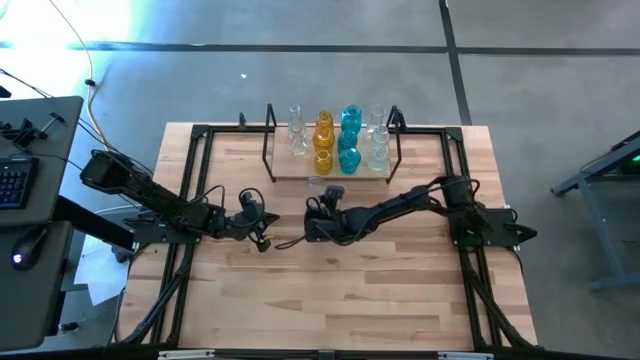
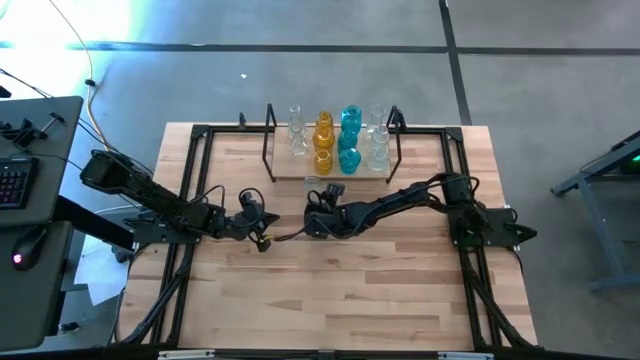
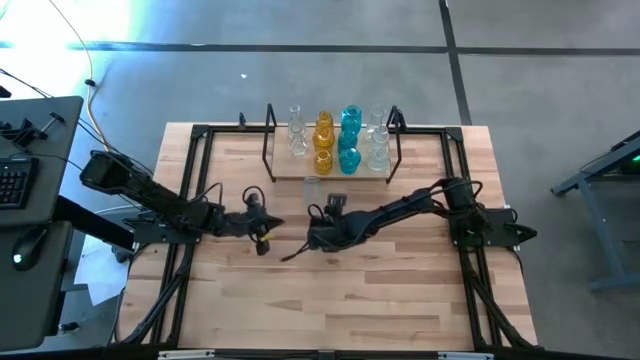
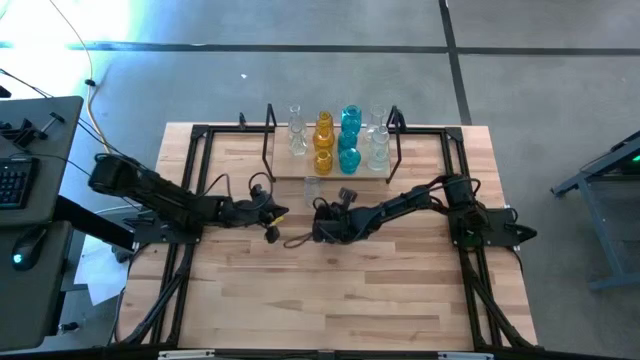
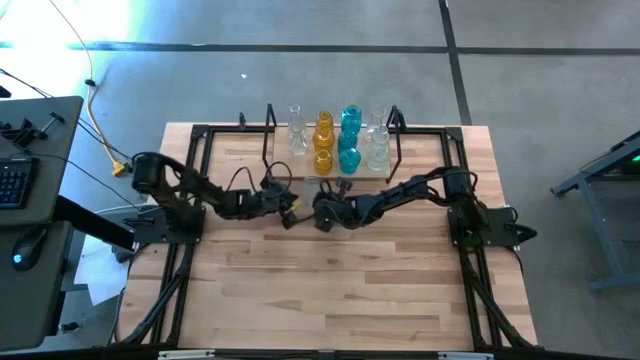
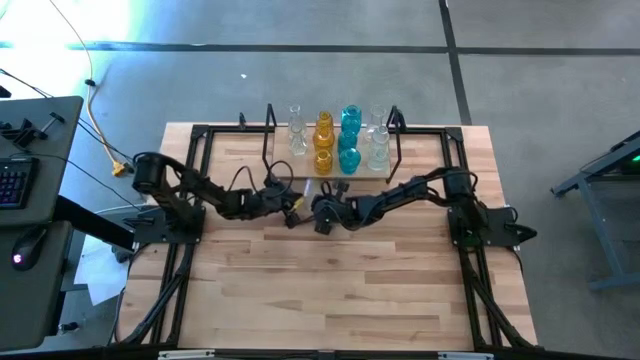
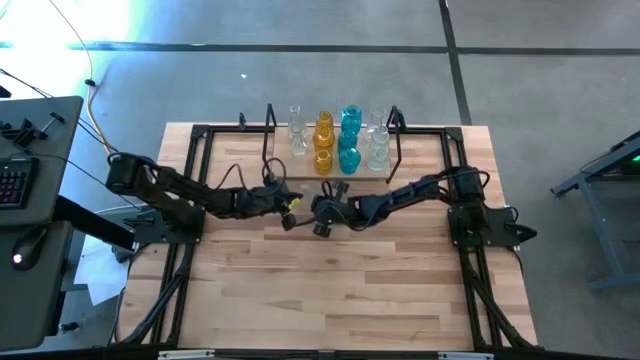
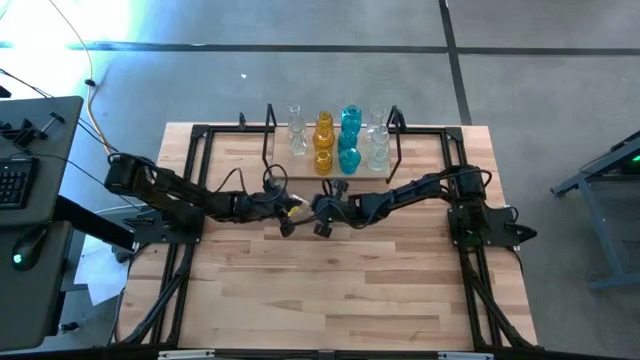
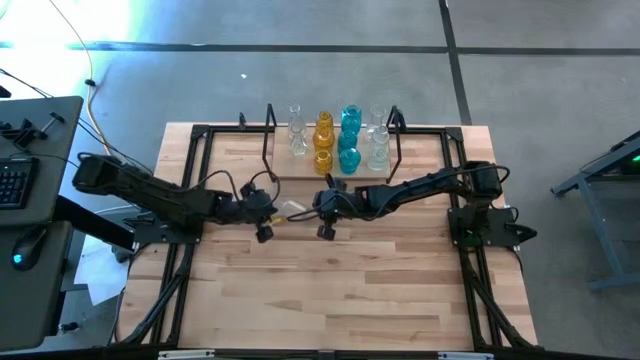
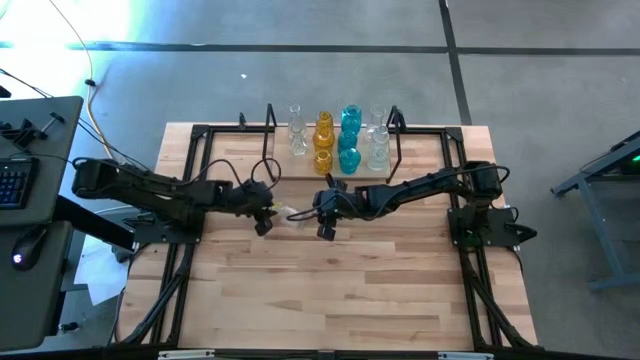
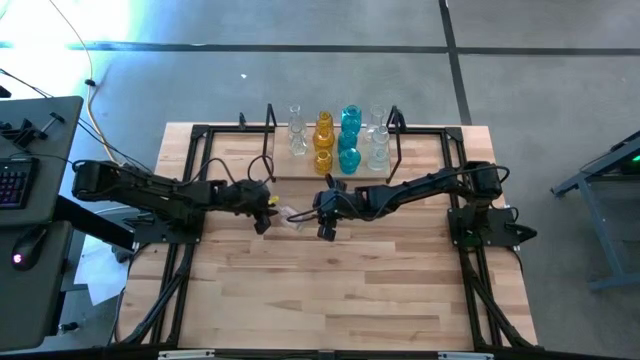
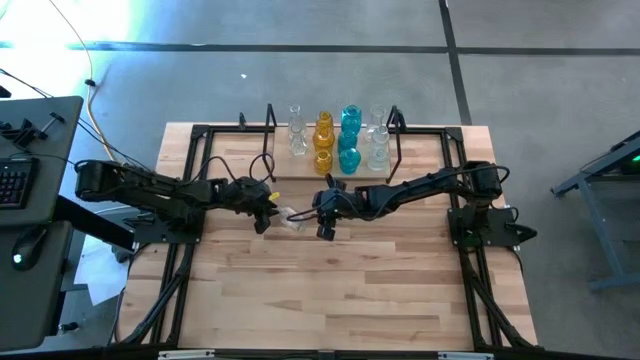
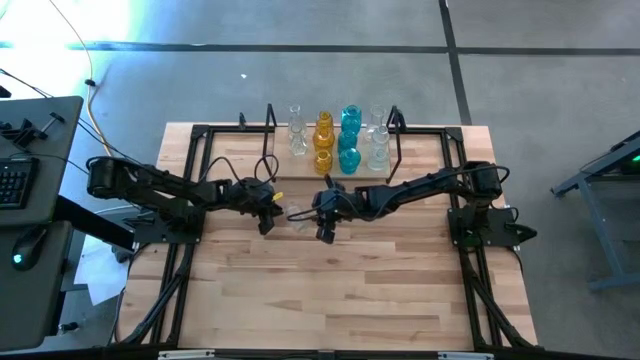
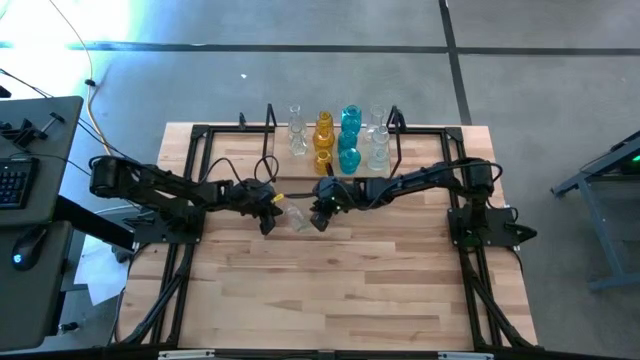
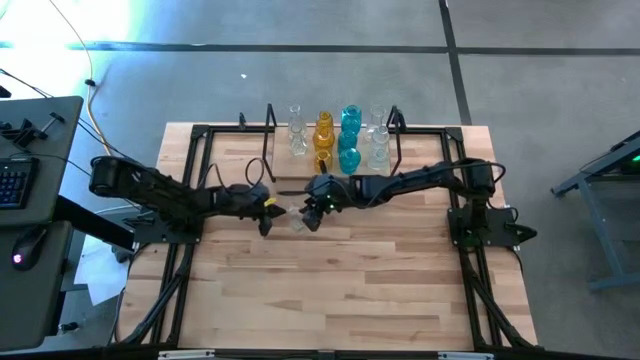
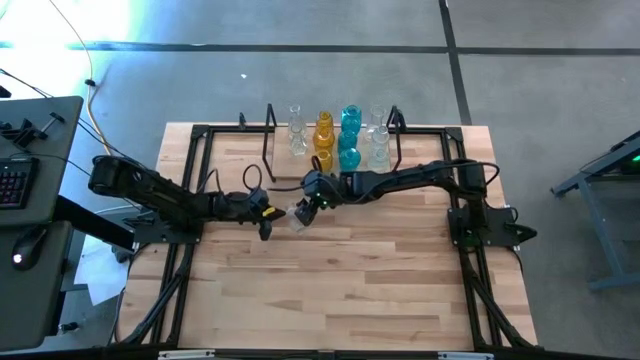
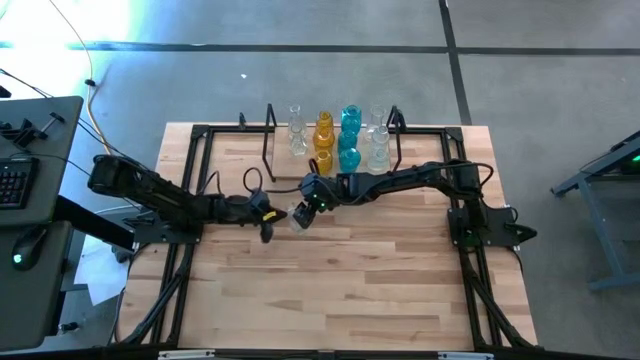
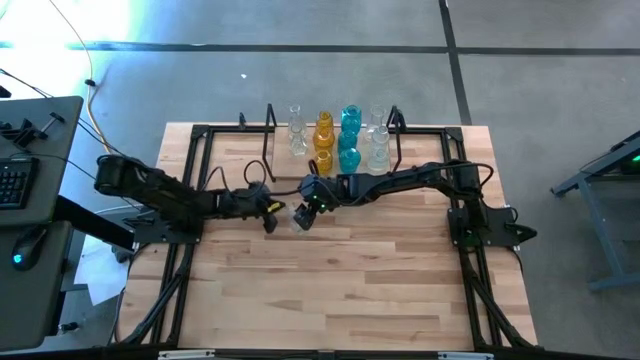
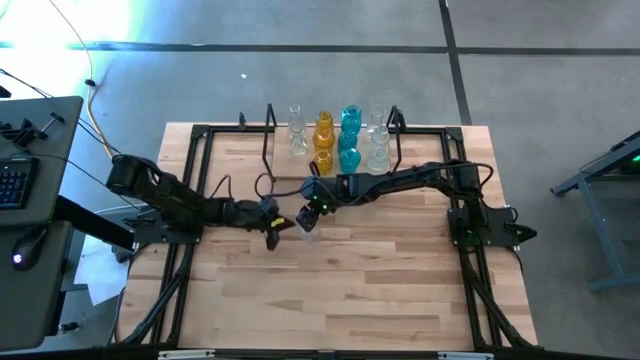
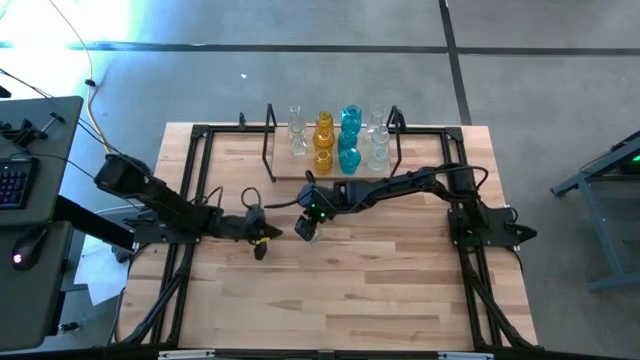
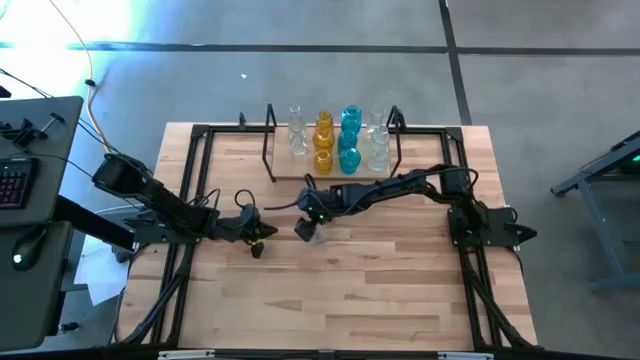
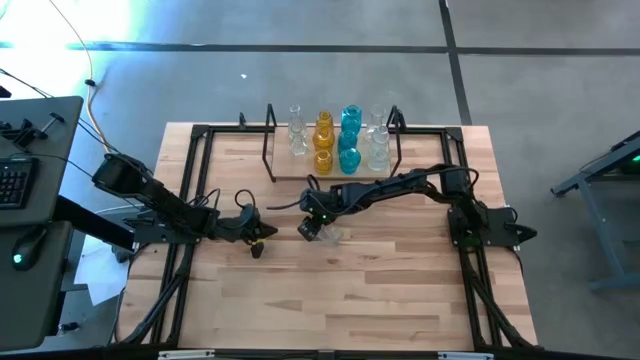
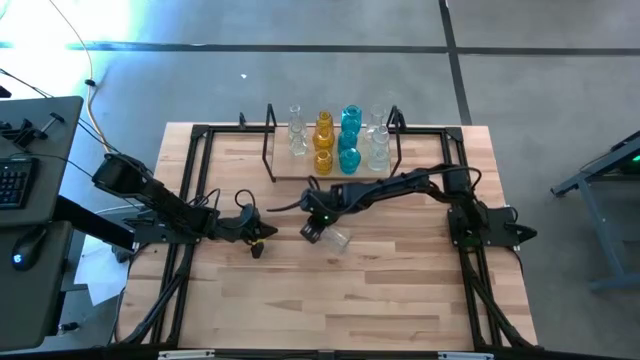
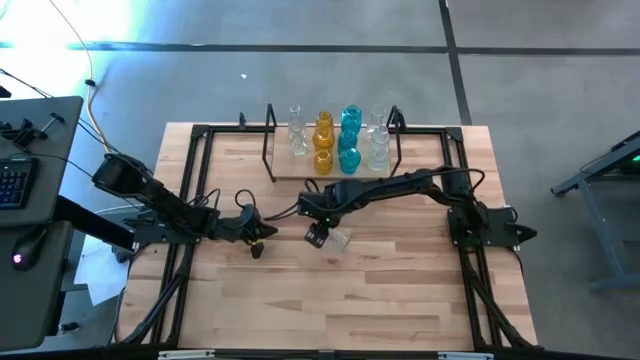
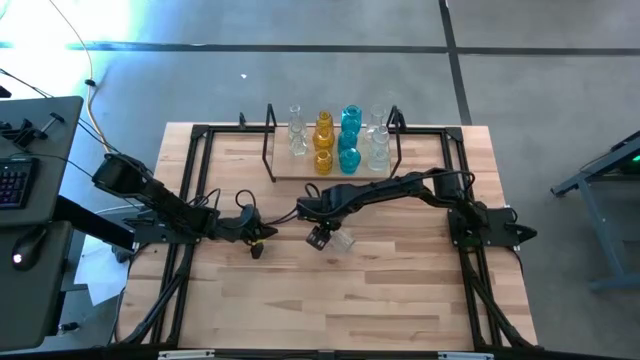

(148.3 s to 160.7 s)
Task: sort vases onto shelf
Put the transparent vase on the shelf aligned with other transparent vase

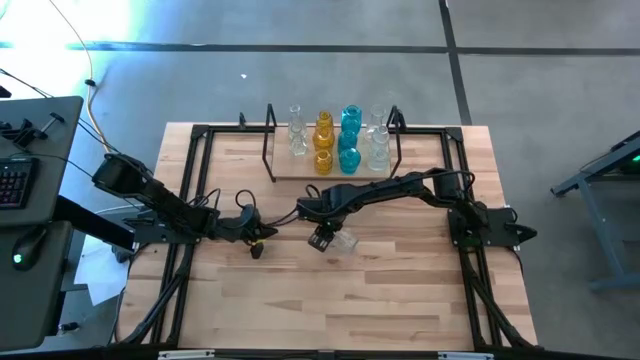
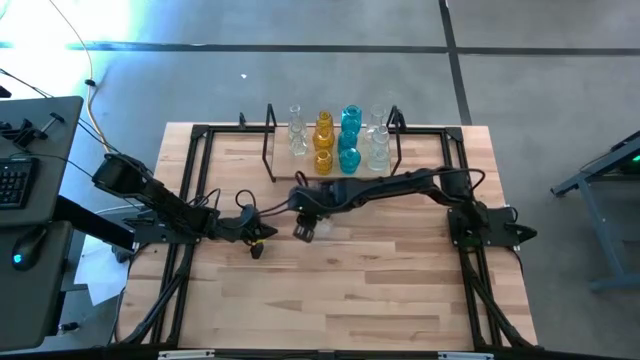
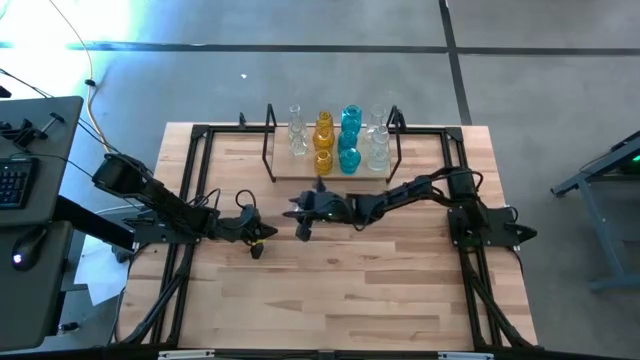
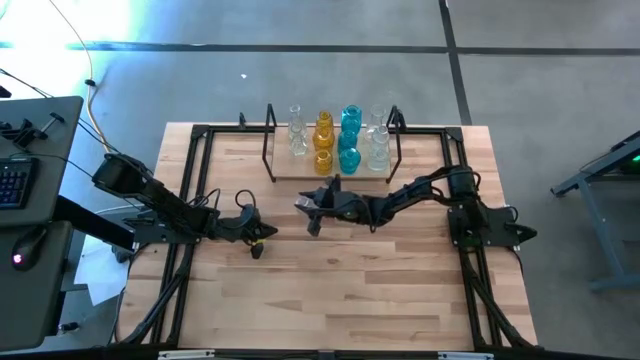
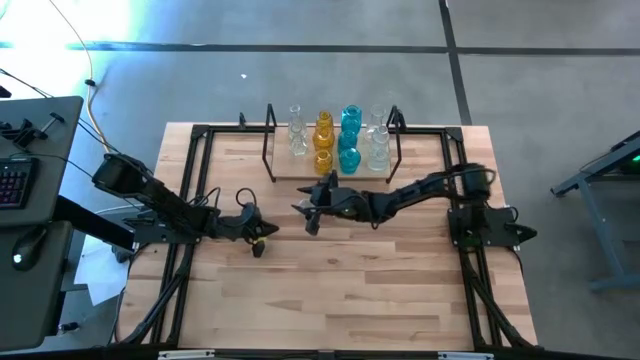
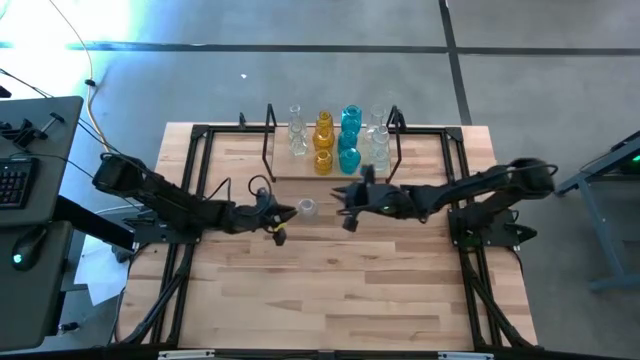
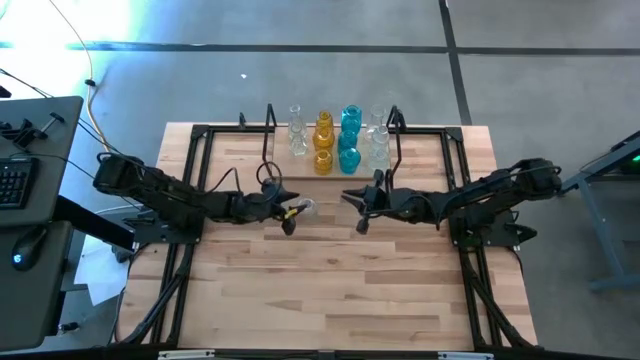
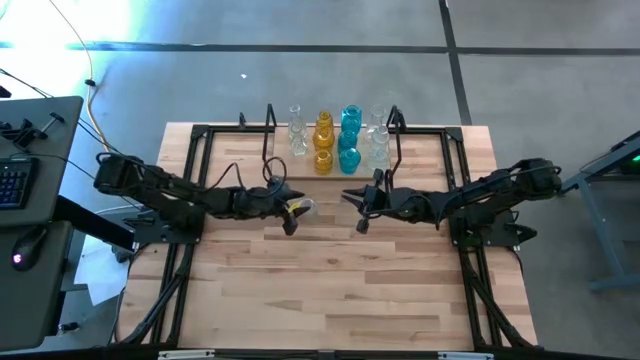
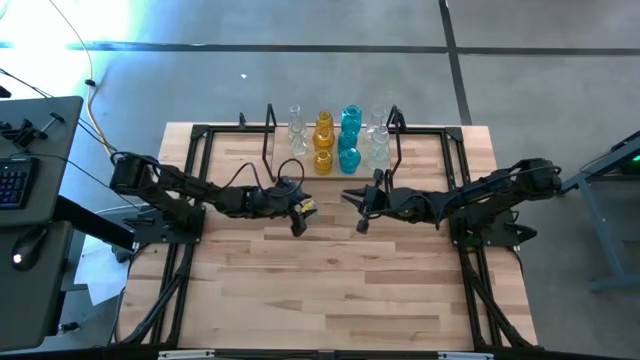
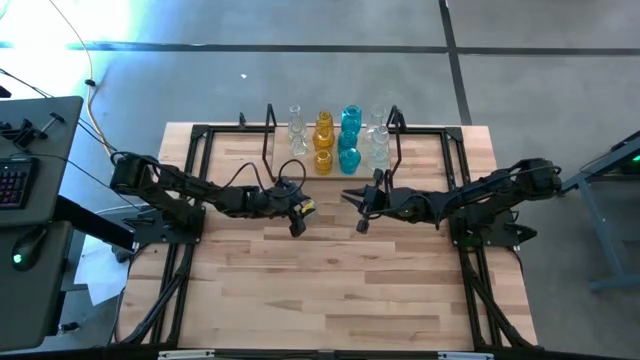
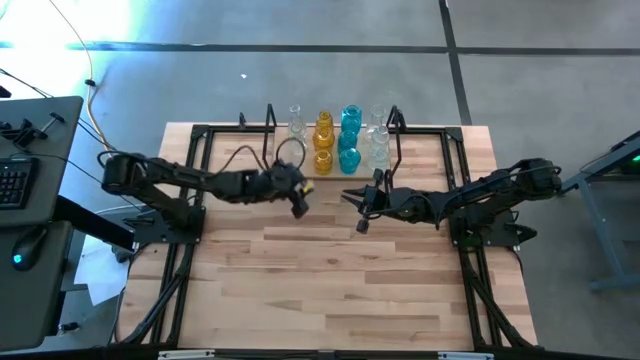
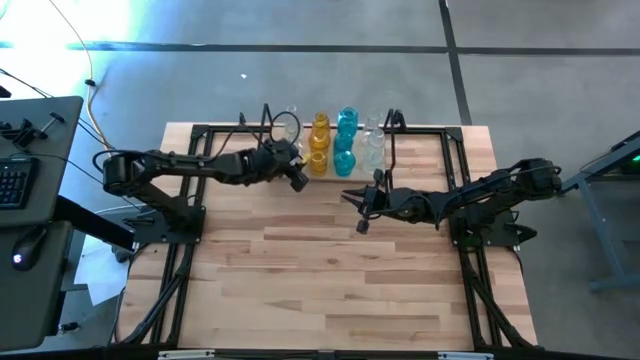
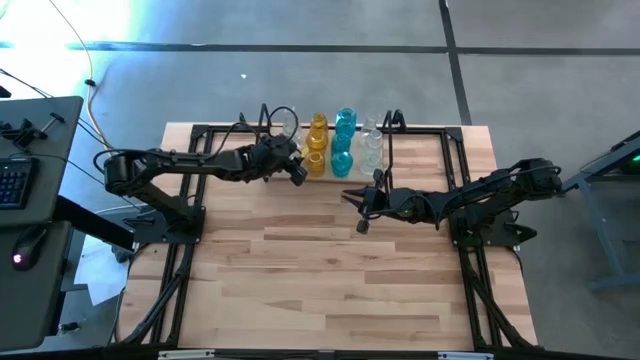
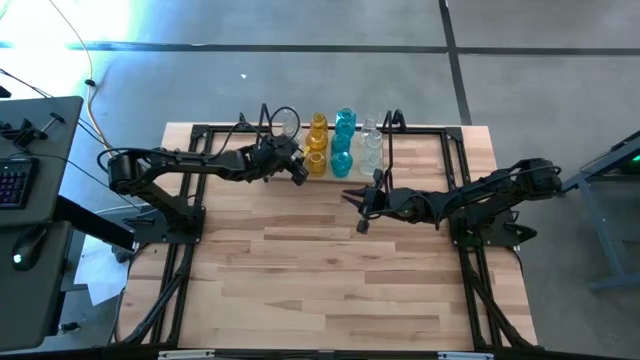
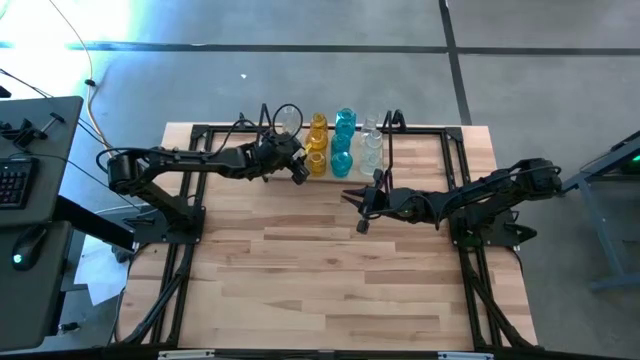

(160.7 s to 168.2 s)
Put the transparent vase on the shelf aligned with other transparent vase

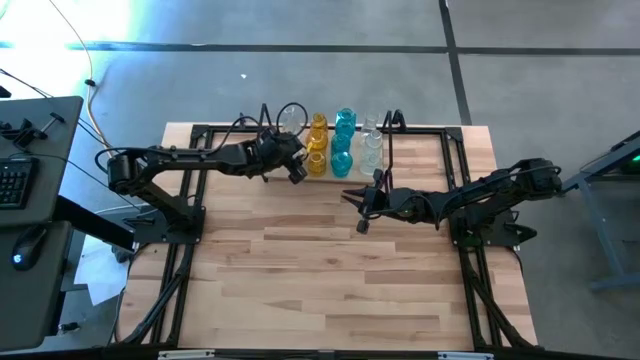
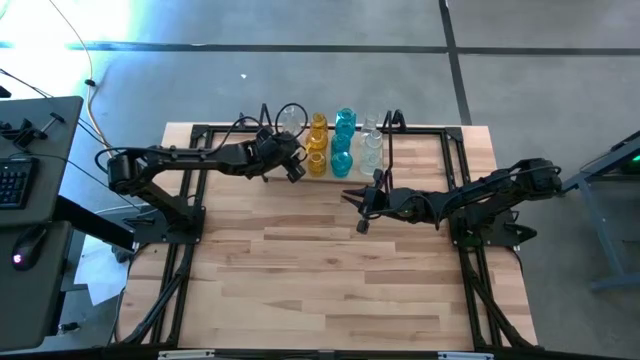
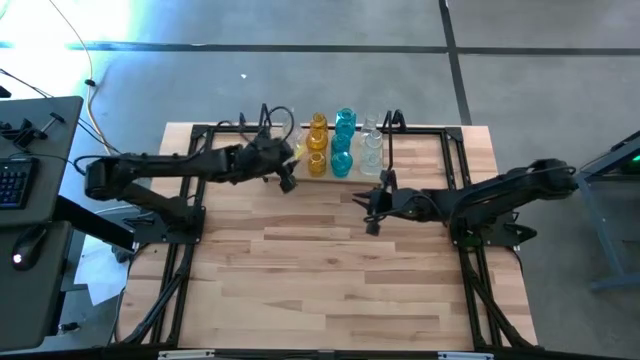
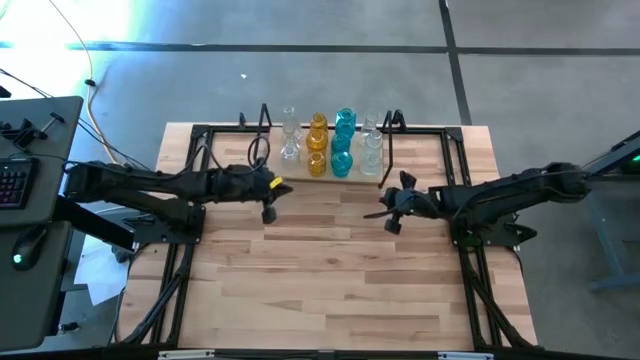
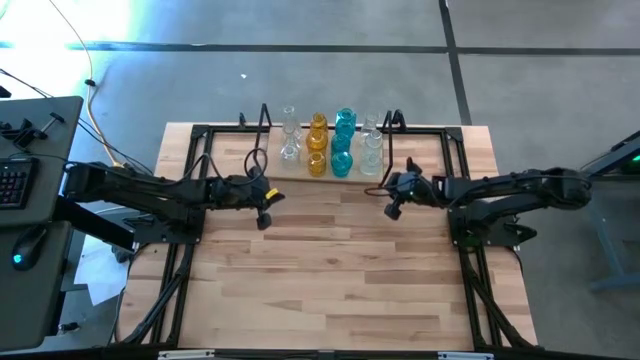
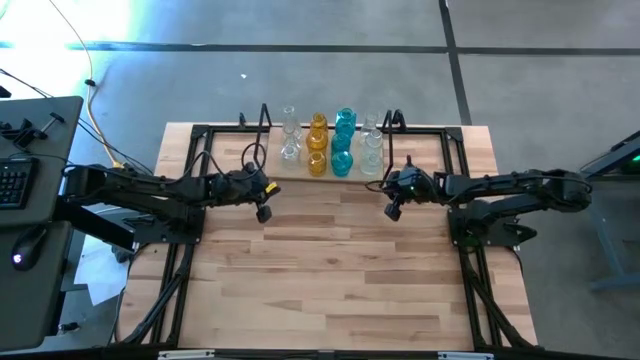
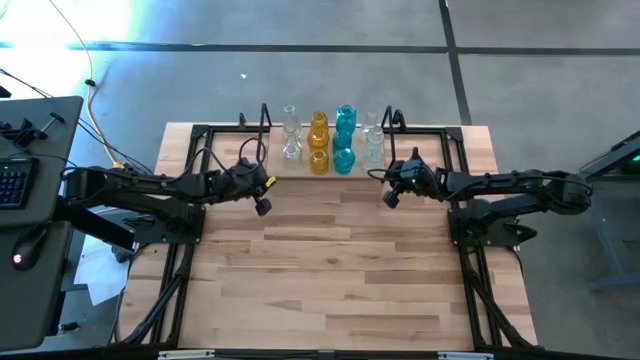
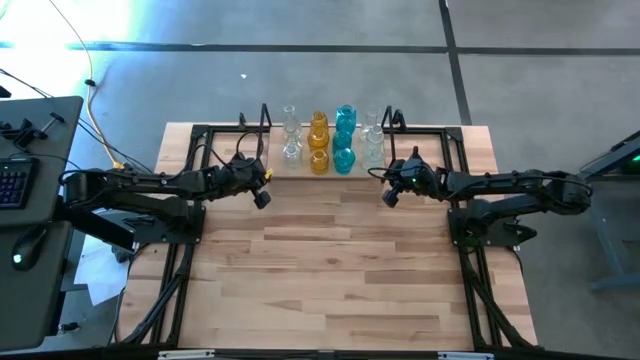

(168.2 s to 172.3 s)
Adjust the shelf
